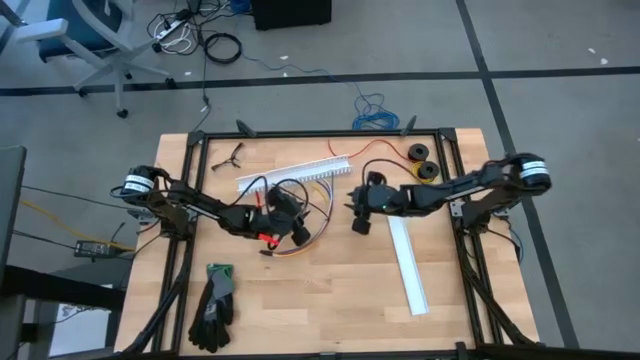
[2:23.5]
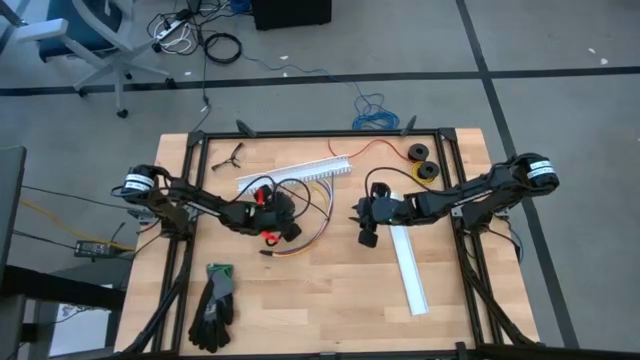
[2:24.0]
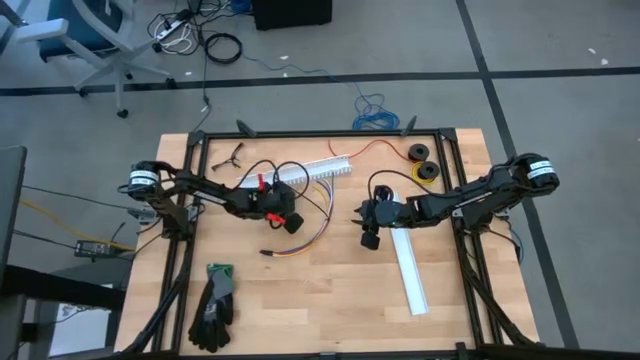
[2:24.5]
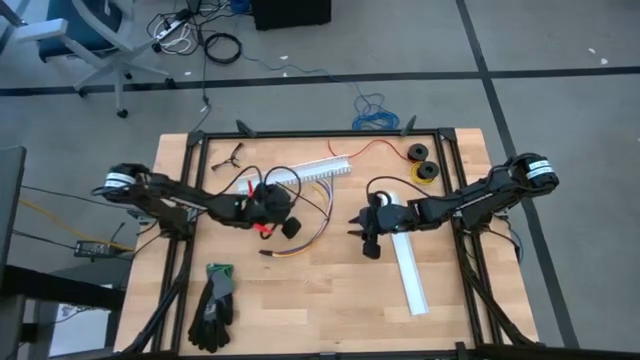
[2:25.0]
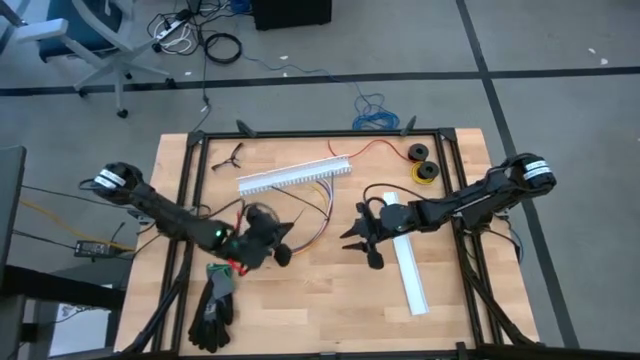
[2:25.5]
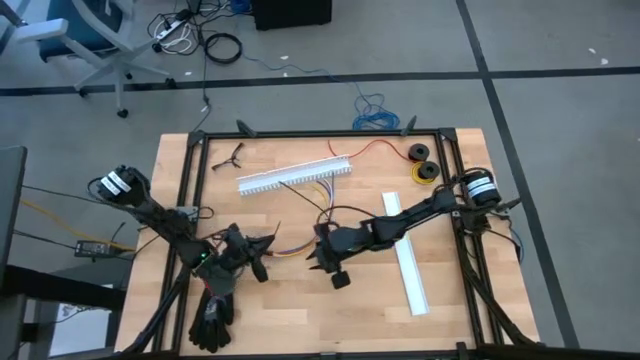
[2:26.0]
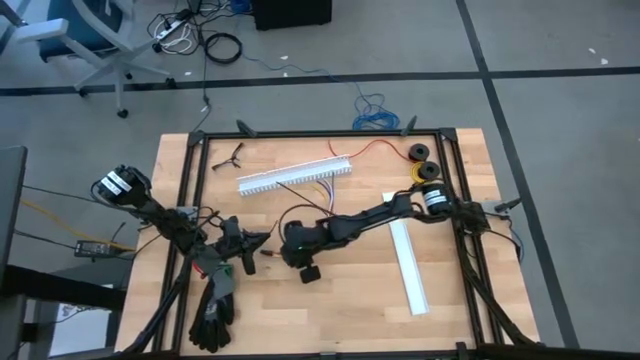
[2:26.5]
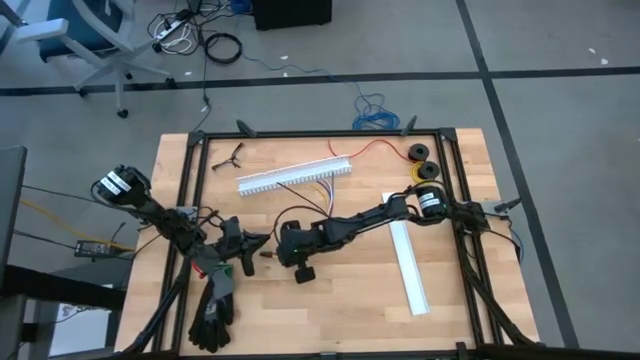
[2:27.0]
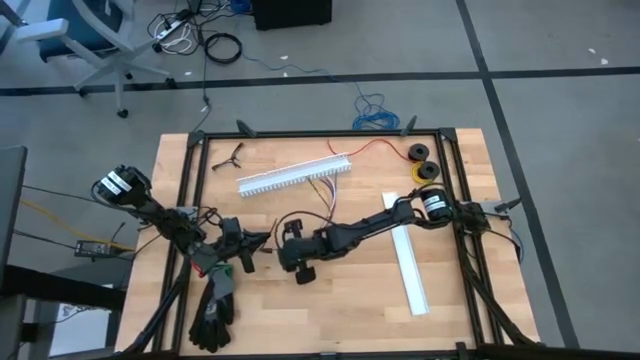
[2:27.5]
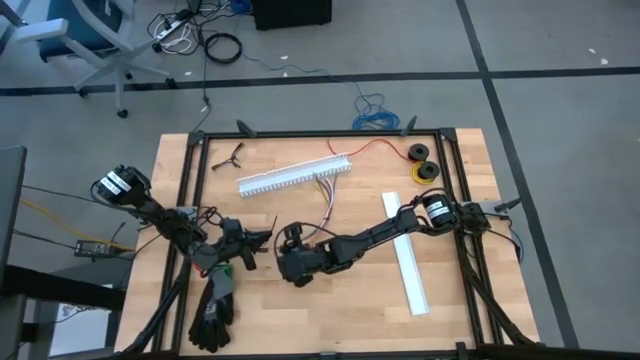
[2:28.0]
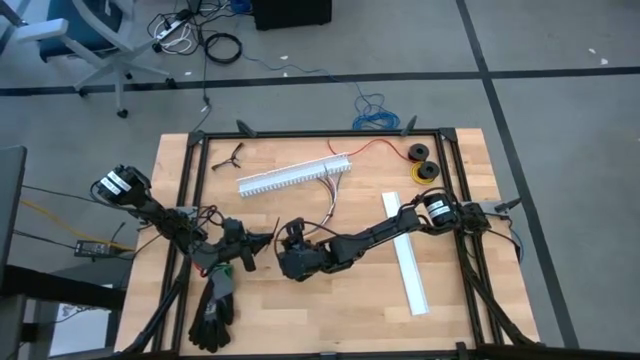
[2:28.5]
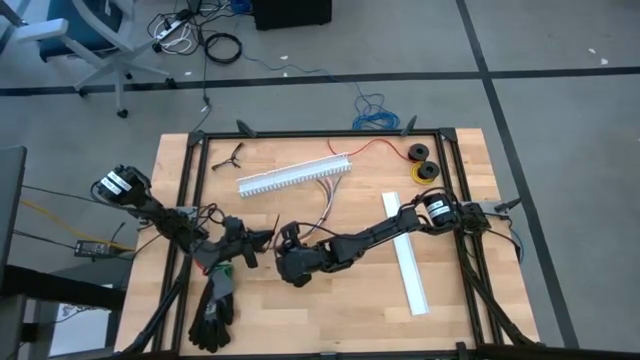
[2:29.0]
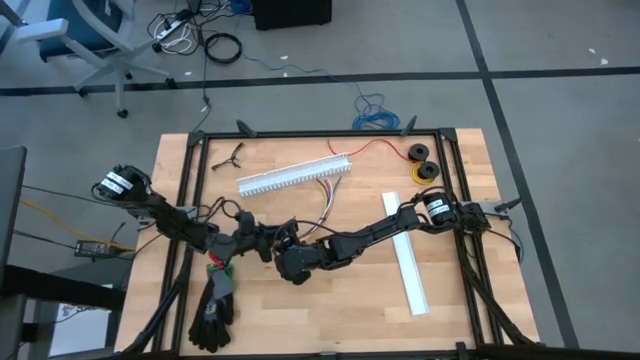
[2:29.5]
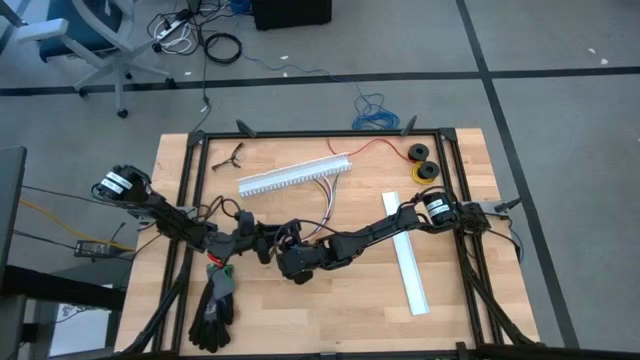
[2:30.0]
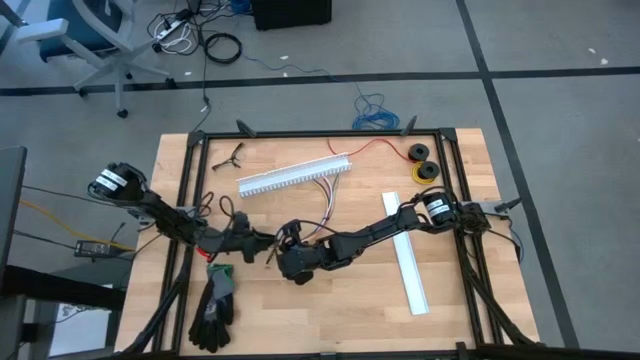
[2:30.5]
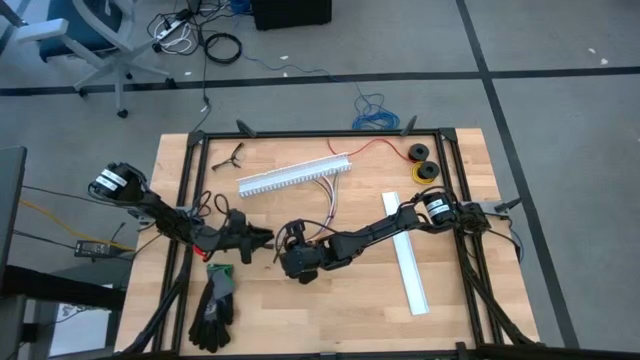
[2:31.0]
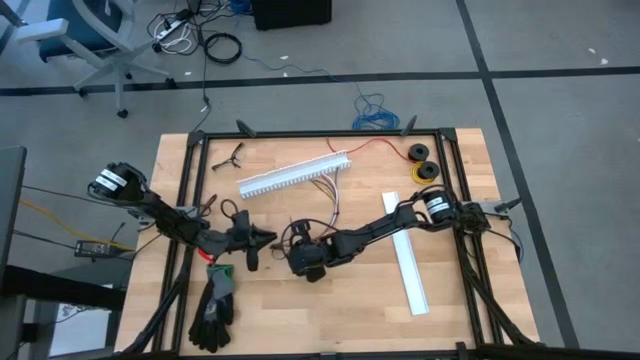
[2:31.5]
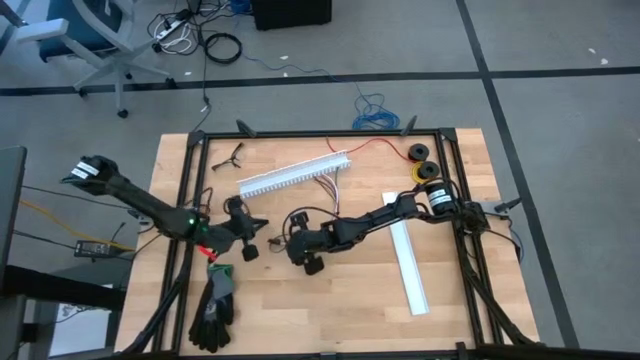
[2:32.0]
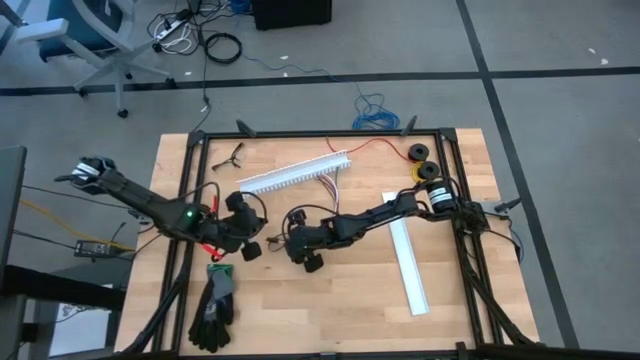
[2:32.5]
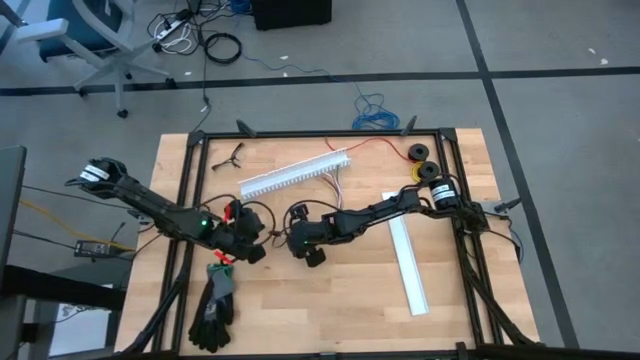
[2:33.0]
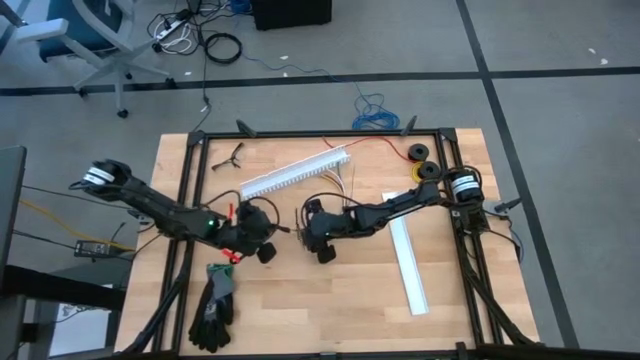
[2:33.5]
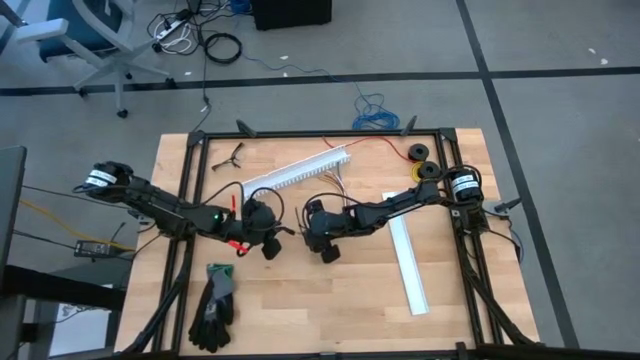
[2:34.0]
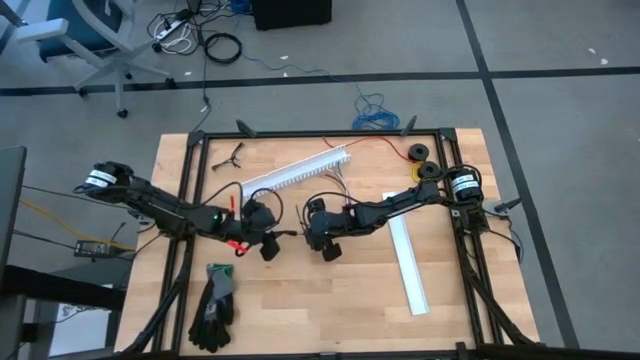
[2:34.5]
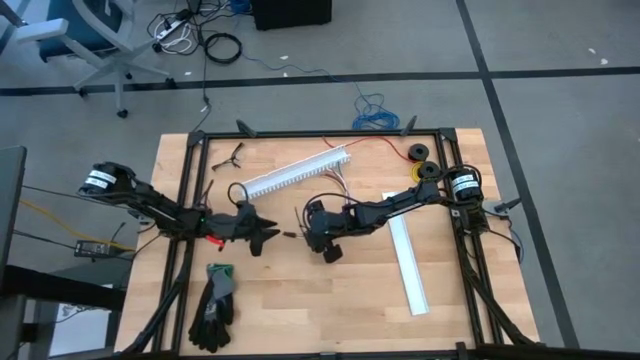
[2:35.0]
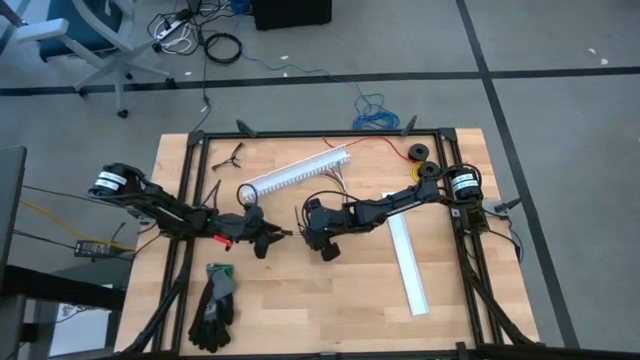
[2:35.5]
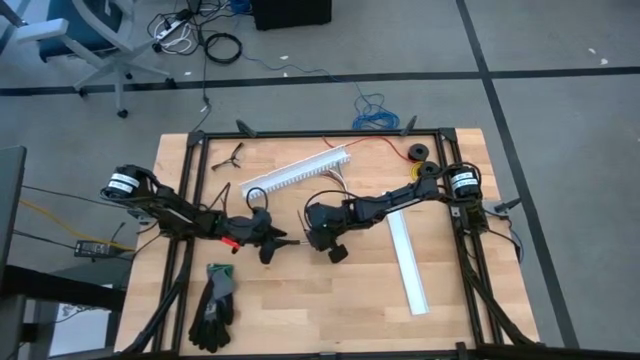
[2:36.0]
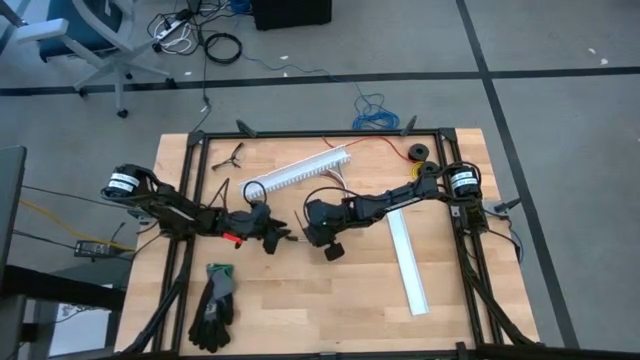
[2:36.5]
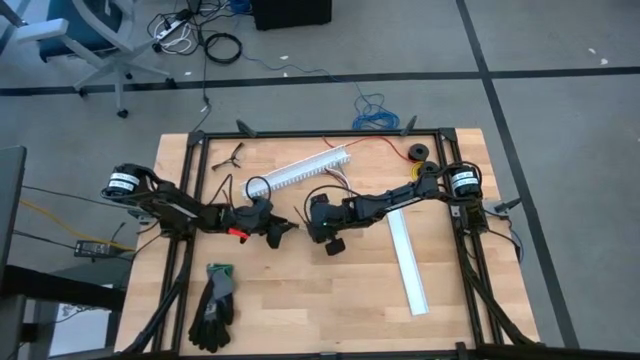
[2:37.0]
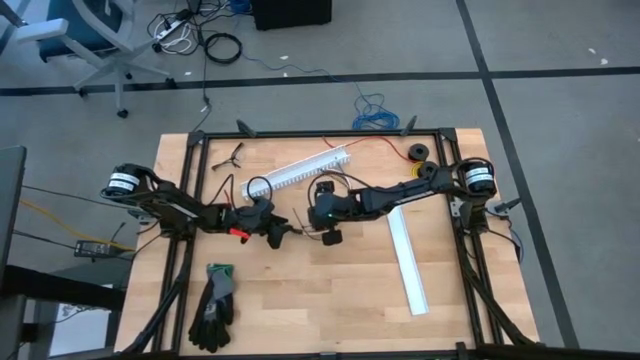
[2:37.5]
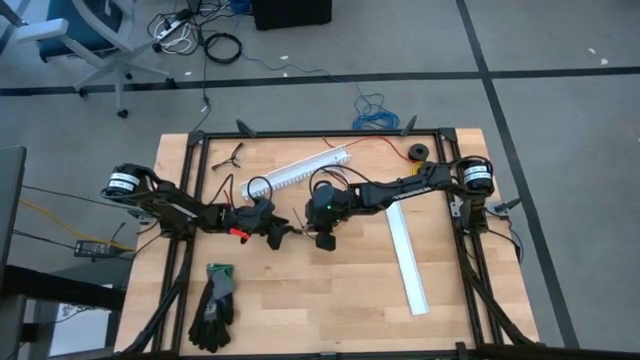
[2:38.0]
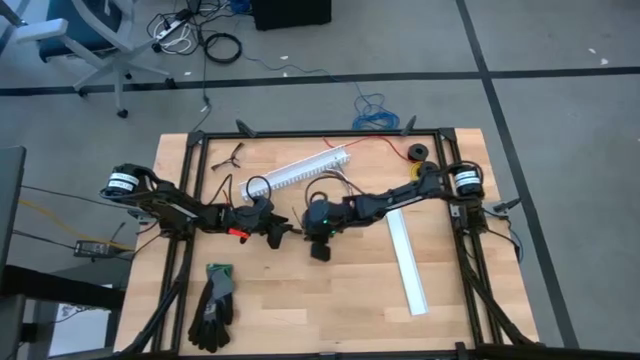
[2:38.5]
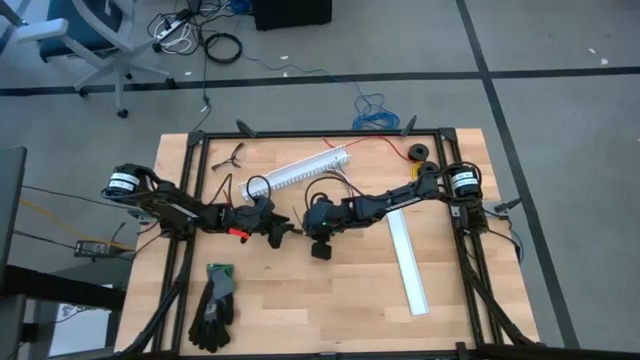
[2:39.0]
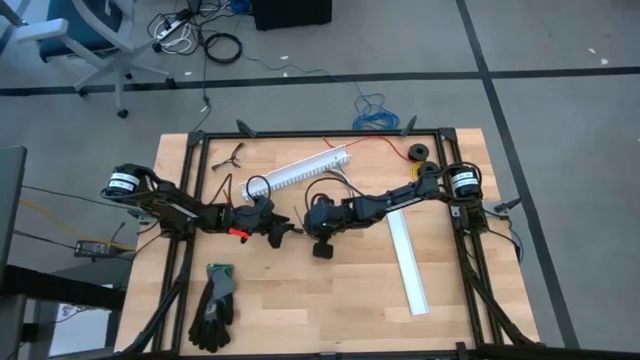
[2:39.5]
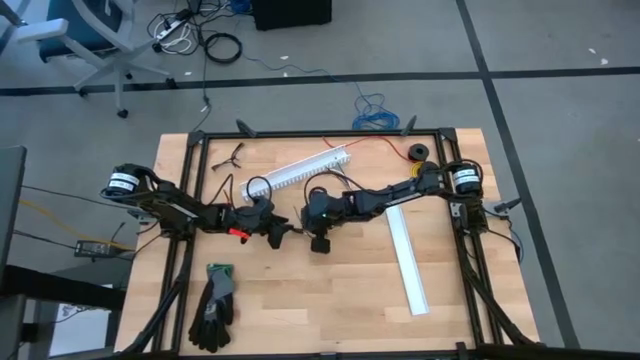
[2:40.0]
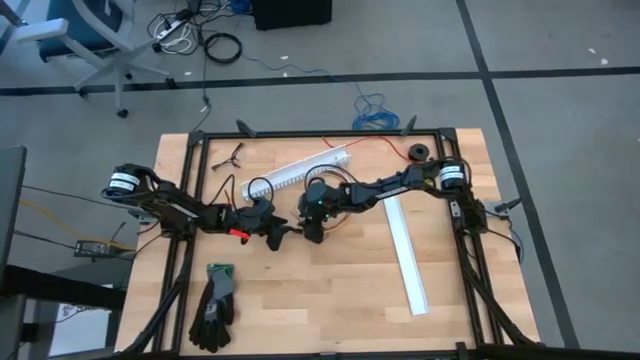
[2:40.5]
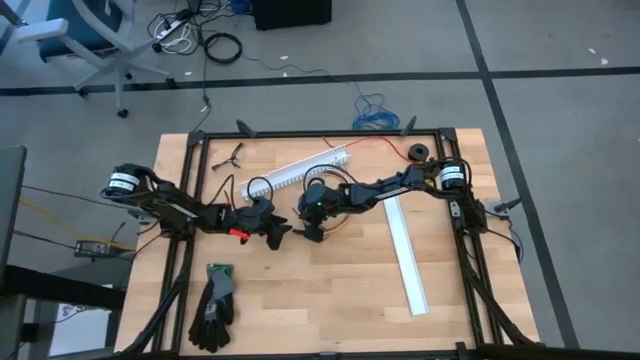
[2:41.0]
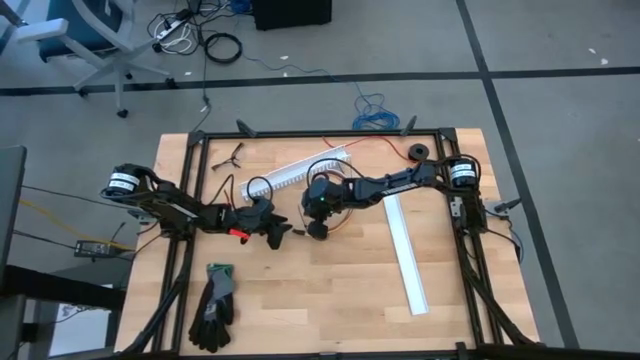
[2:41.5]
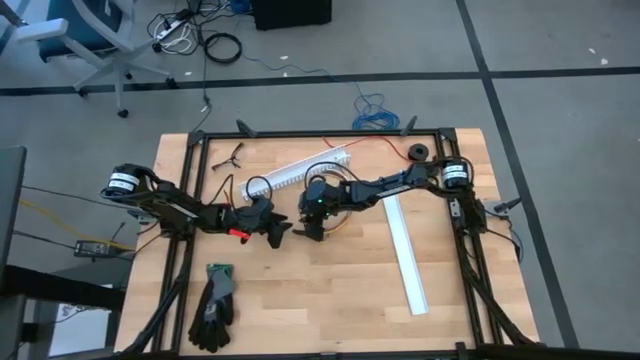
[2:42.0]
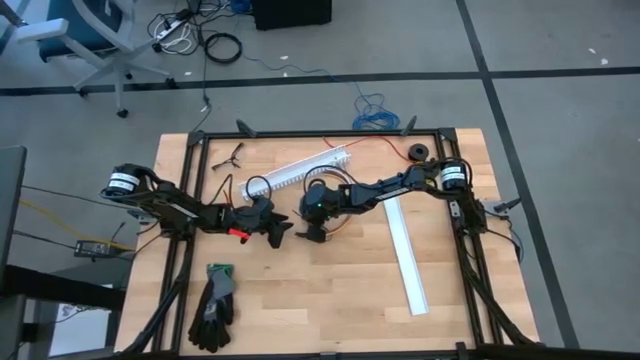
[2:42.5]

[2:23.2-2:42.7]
Task: Ziptie cables
Wrap the cable wires with black zip tie

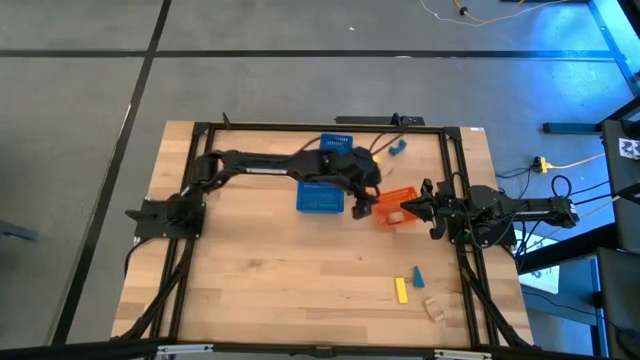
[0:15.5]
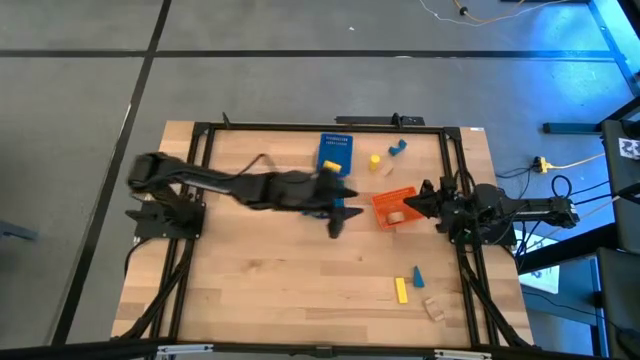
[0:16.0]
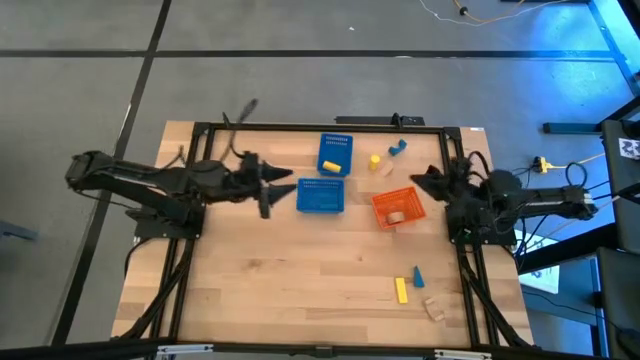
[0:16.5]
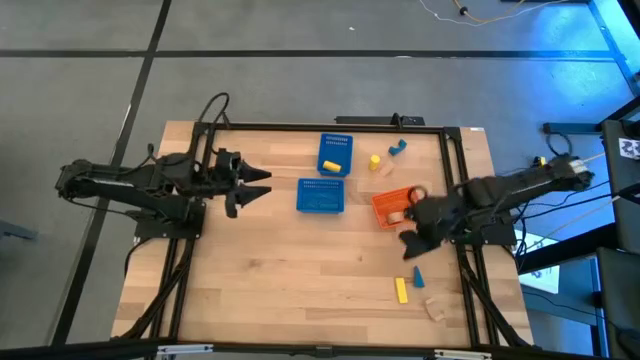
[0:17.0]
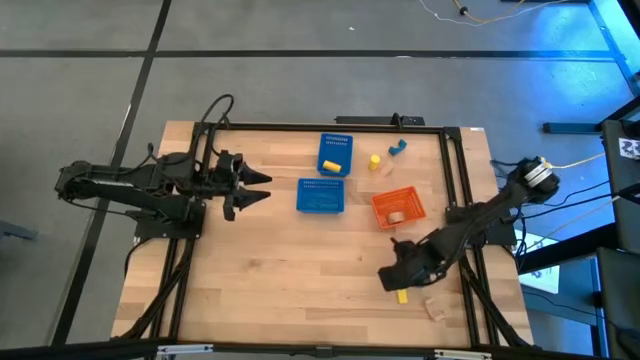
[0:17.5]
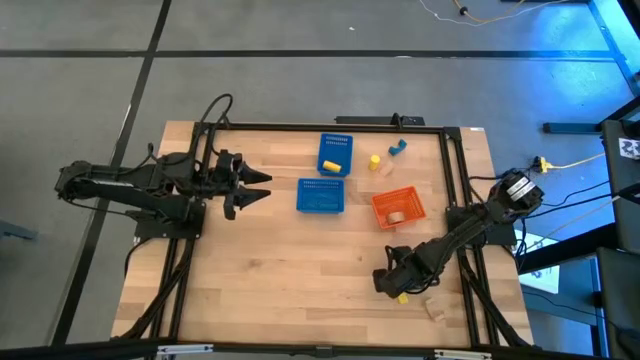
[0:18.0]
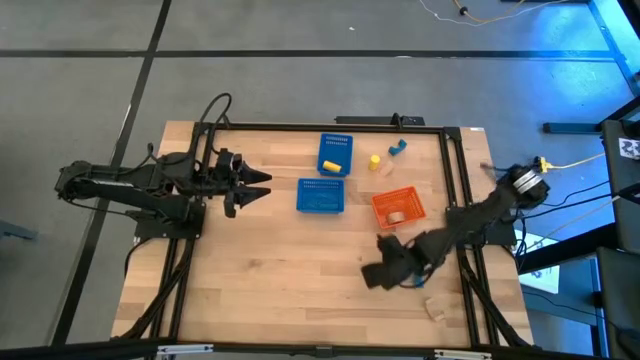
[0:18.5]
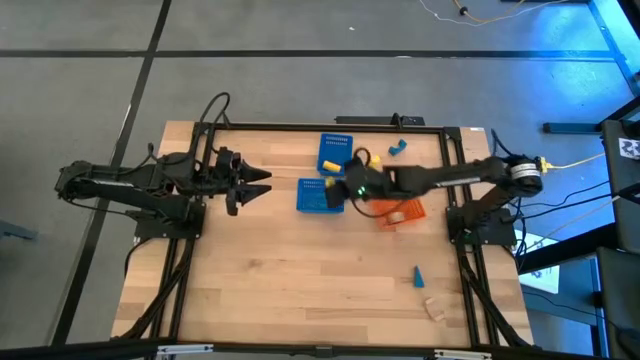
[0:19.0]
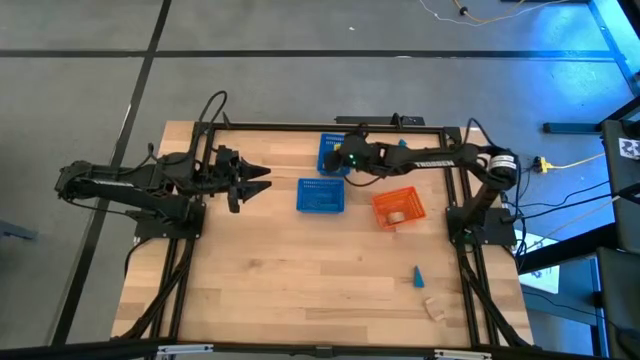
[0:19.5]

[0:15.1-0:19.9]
Task: Sort & place blocks by color
Put the bottom yellow block into the top blue basket
